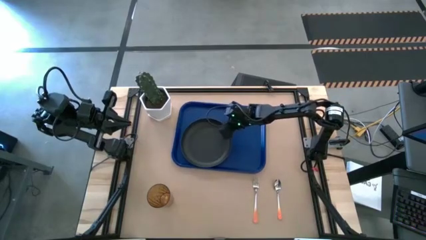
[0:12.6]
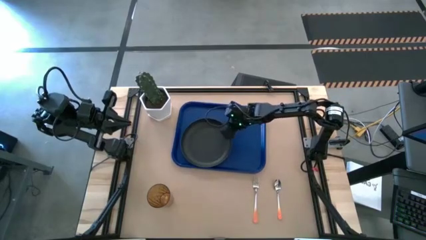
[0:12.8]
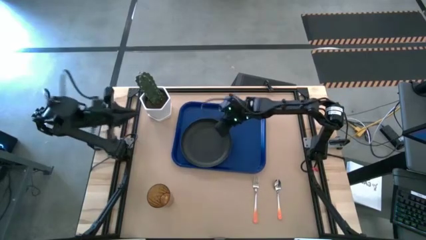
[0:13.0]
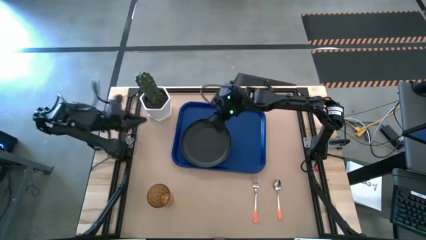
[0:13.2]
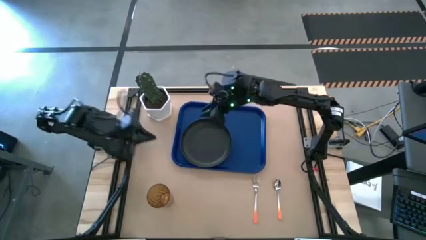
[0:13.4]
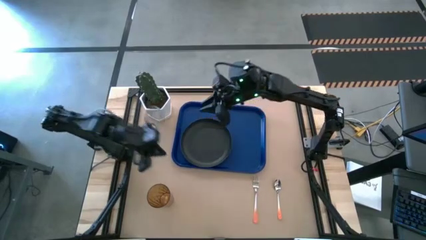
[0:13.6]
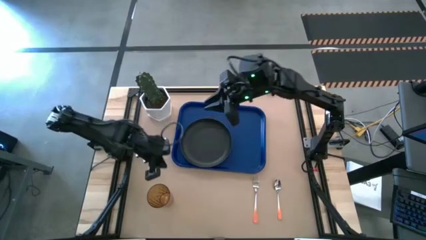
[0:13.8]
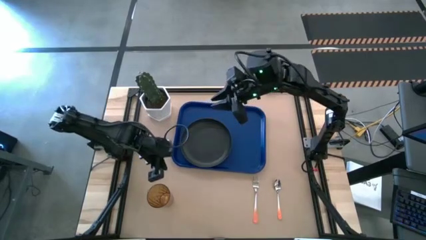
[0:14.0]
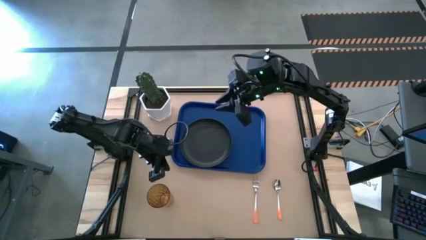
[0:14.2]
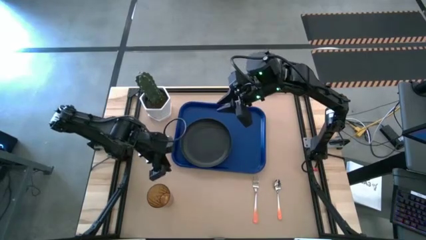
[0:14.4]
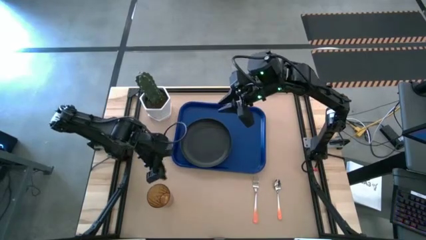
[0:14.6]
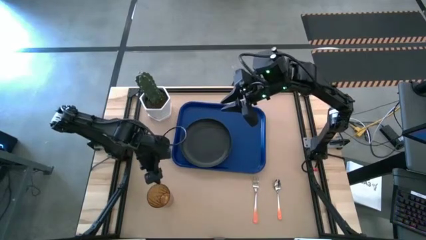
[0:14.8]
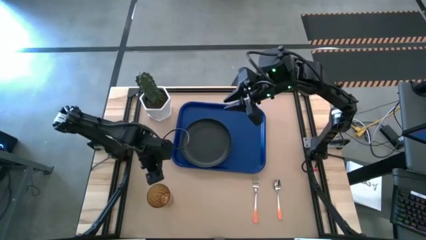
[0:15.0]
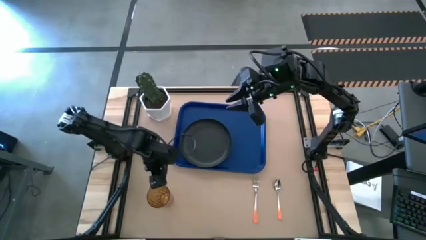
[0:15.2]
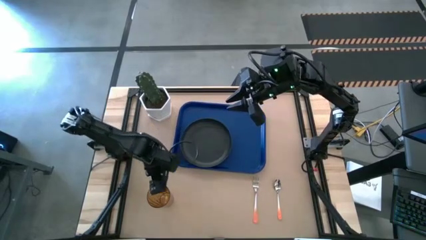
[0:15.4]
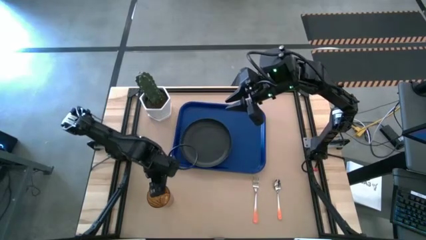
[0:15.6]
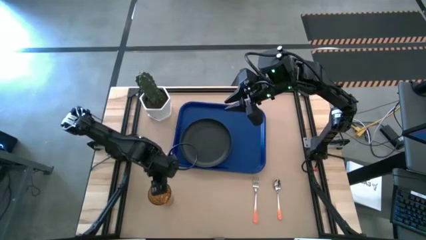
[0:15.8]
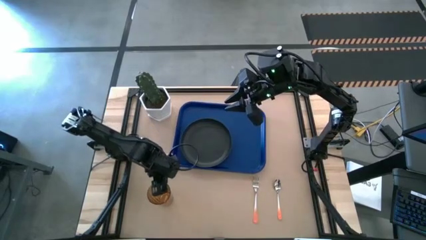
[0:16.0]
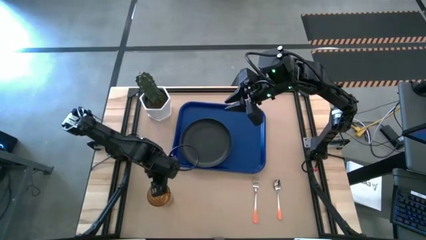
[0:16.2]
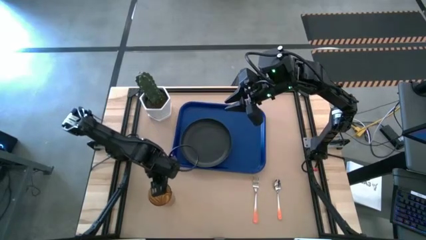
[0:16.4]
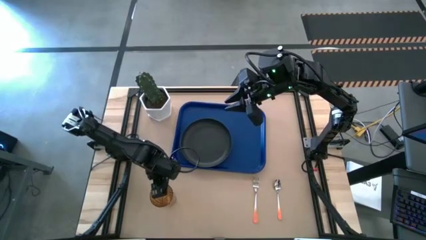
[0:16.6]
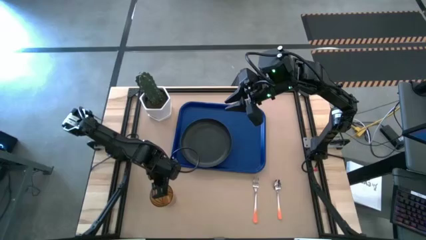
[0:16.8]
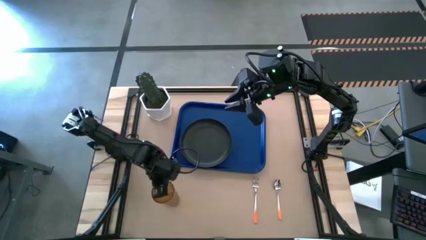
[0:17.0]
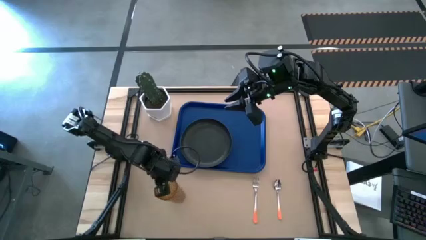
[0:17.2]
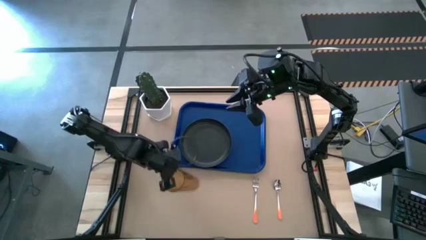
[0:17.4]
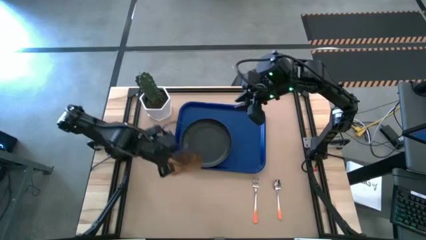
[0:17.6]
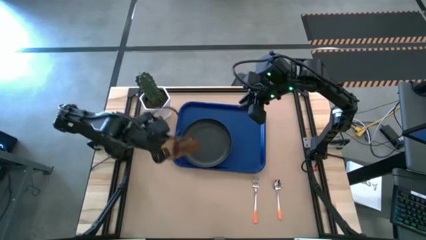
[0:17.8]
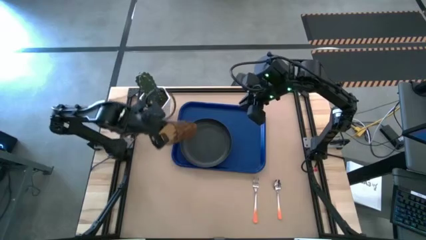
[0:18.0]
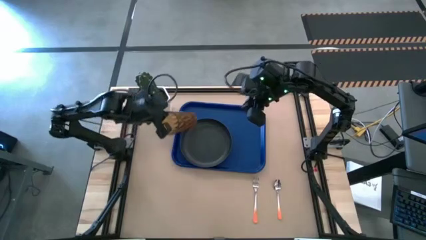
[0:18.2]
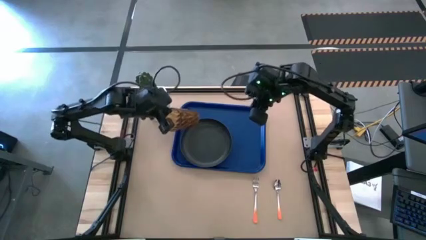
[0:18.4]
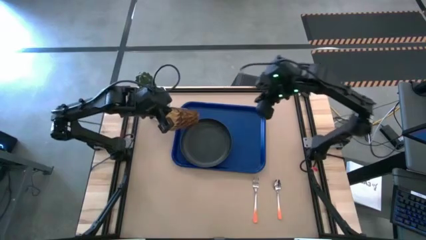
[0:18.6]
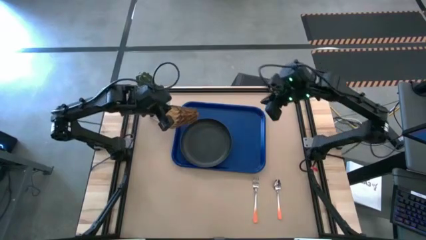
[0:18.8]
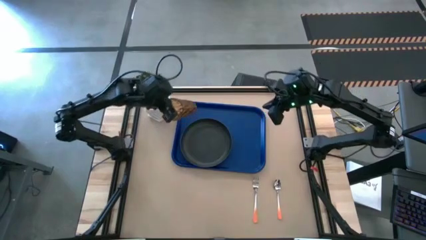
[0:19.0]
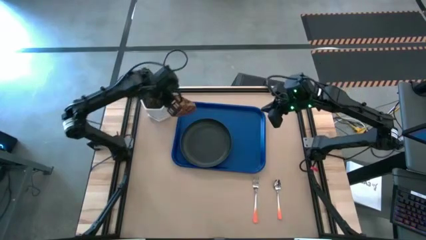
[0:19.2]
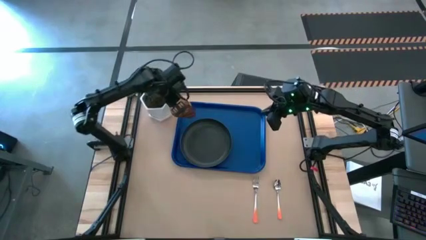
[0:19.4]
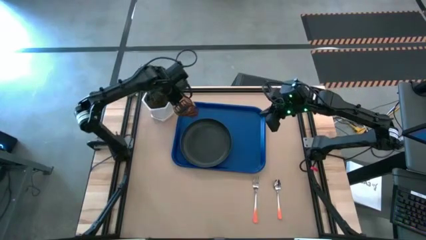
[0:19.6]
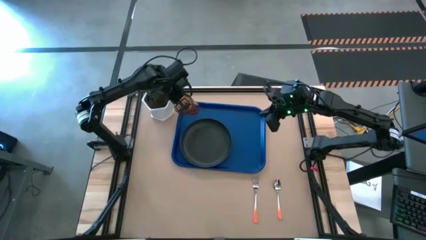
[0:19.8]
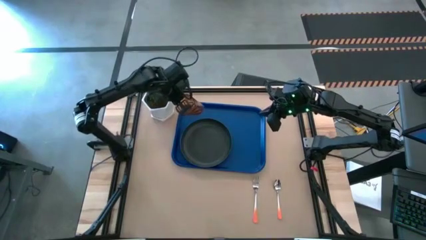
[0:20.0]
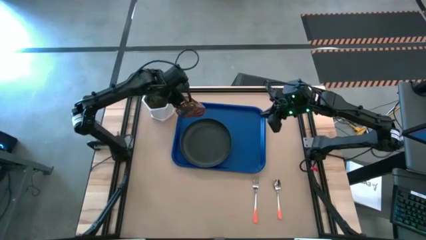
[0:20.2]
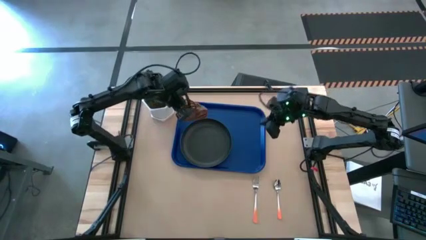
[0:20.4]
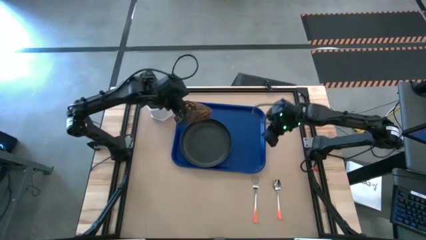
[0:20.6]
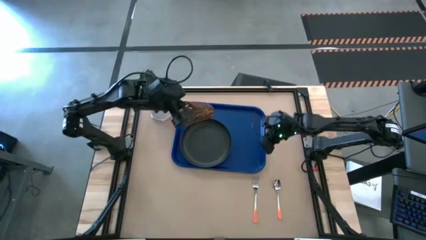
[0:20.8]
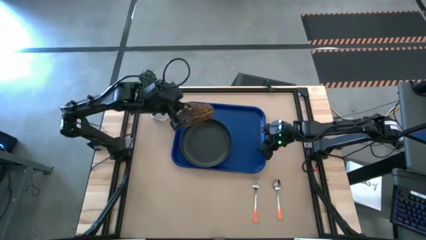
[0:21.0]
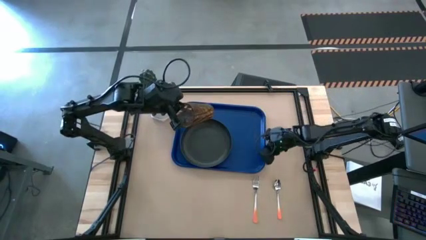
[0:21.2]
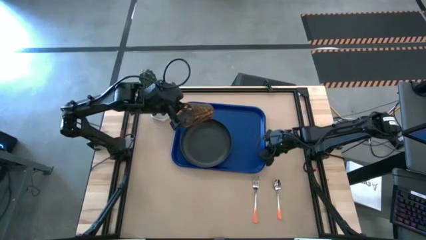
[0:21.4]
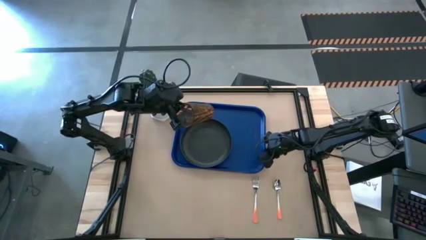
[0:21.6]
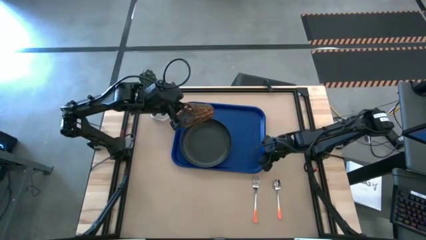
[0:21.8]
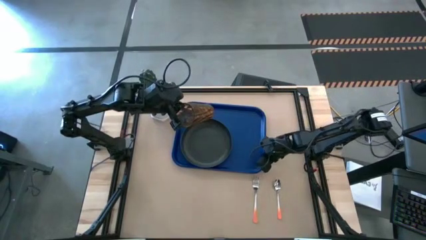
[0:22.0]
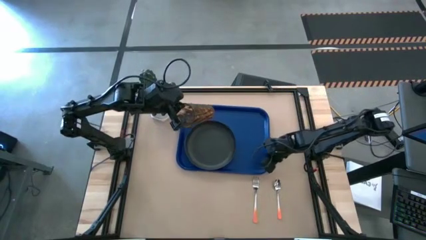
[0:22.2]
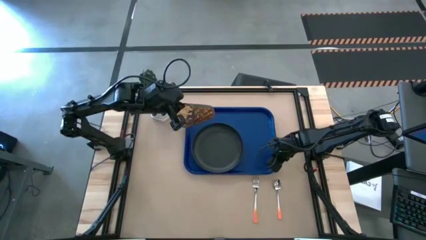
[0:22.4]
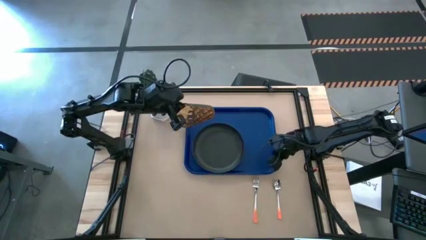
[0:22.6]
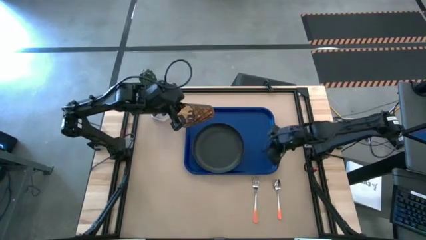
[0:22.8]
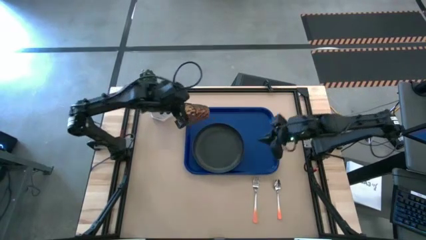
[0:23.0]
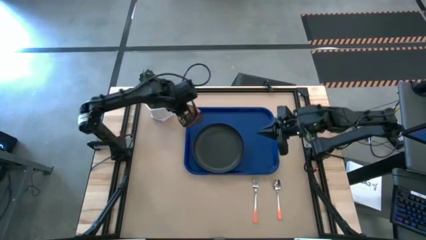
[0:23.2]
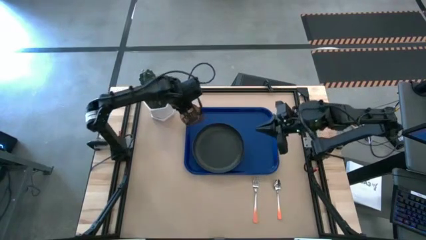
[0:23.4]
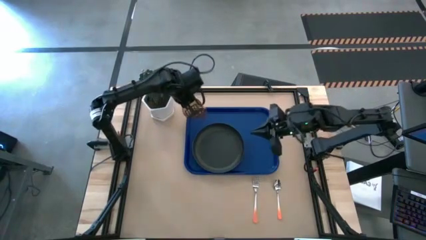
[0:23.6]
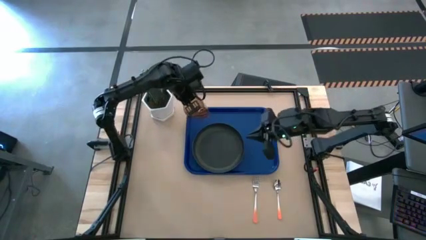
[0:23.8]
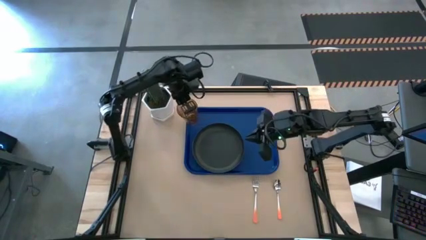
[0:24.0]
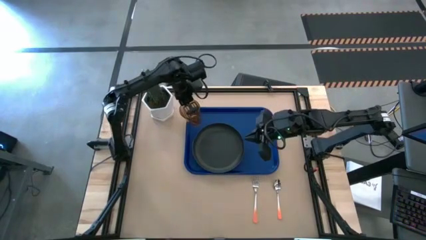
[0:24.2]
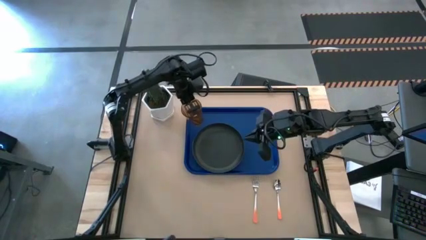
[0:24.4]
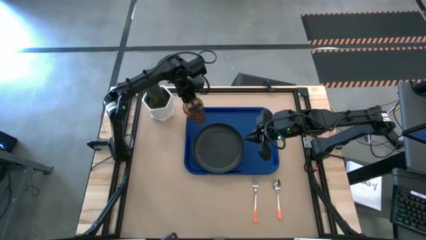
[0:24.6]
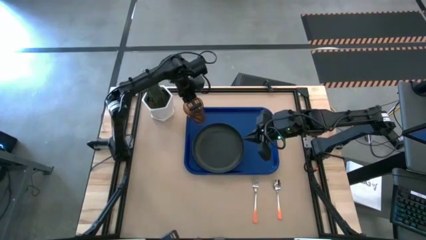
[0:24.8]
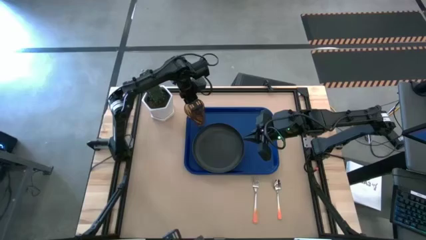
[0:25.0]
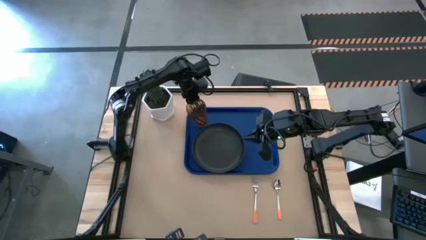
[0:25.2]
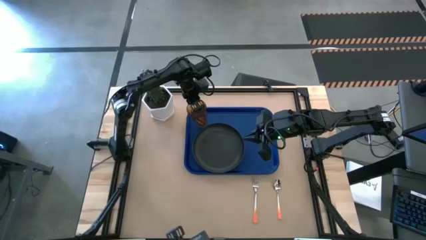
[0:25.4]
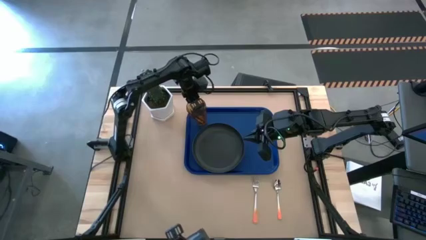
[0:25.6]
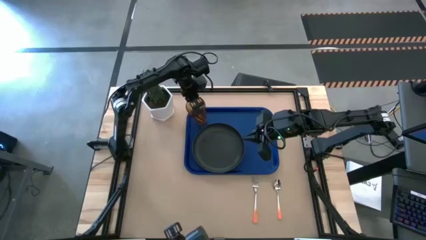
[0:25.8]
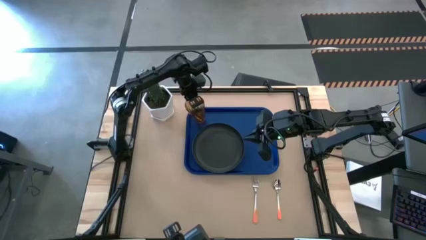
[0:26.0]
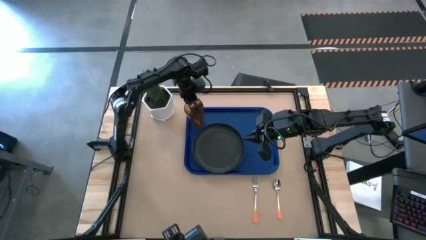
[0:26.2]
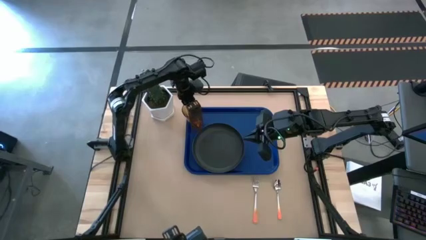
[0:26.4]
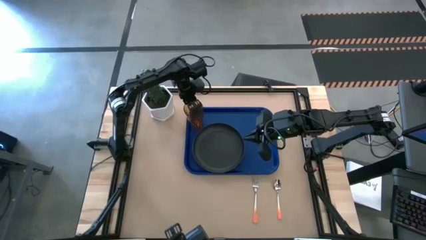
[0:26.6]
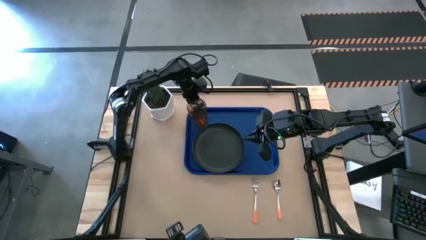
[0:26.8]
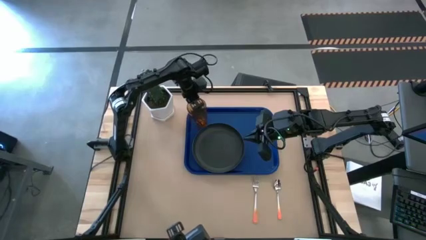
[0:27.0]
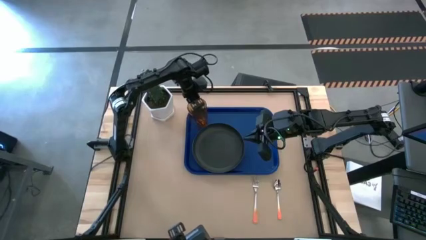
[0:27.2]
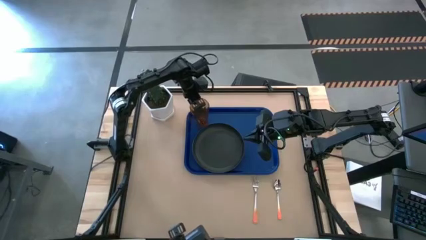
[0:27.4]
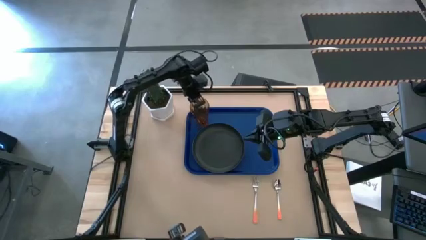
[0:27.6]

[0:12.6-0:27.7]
Task: Pick and place plate/cup/fork/spoon on tray
Put the orange cup on the blue tray to the top left of the black plate
